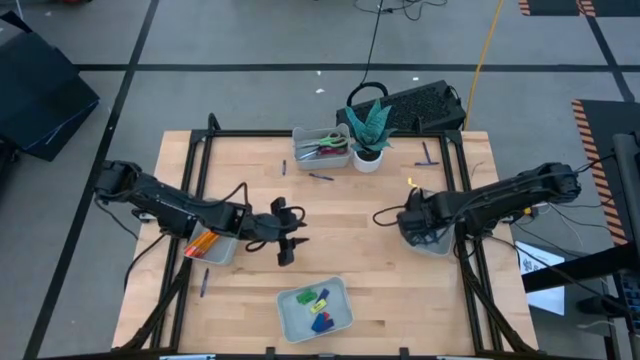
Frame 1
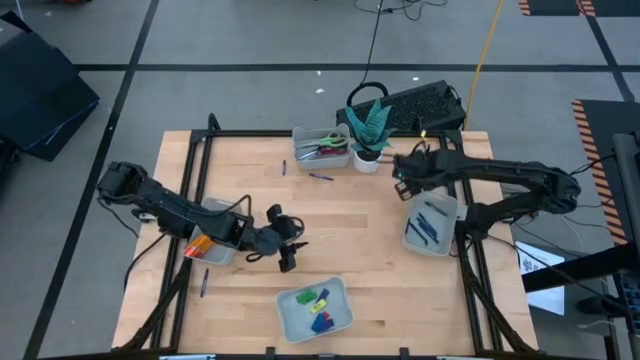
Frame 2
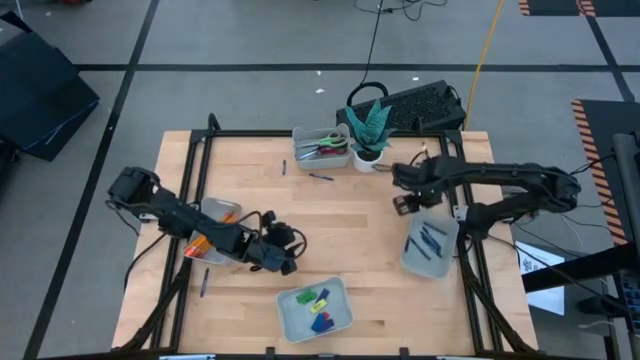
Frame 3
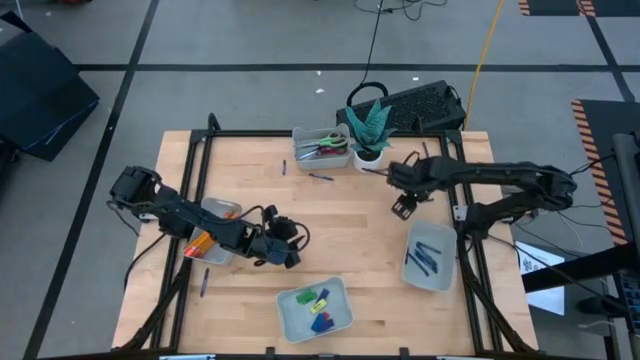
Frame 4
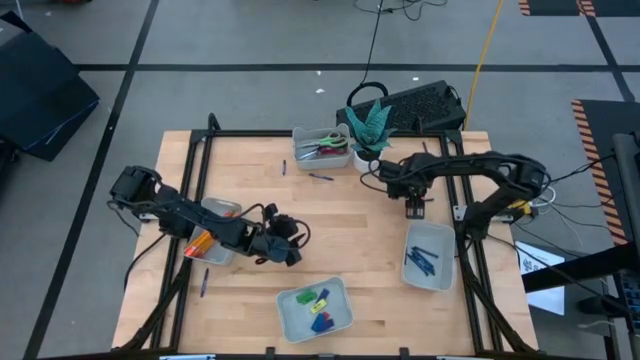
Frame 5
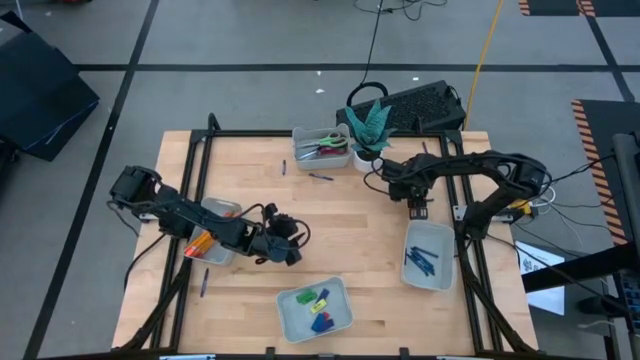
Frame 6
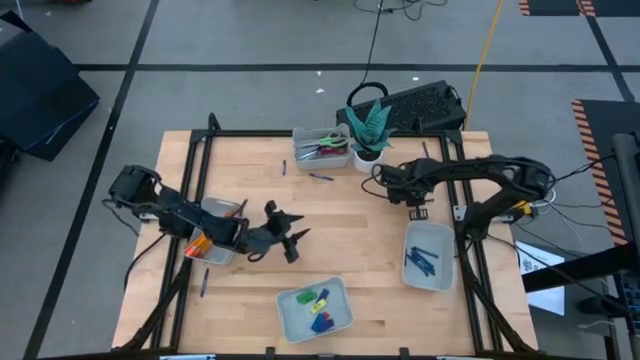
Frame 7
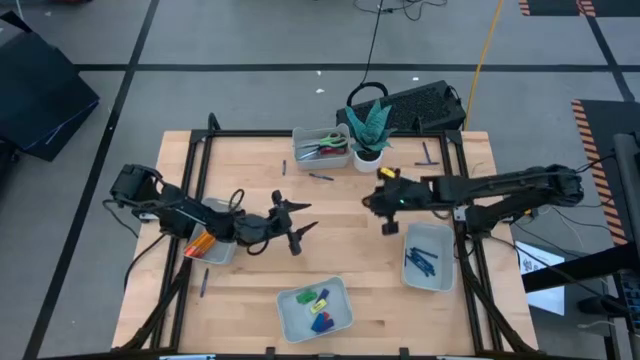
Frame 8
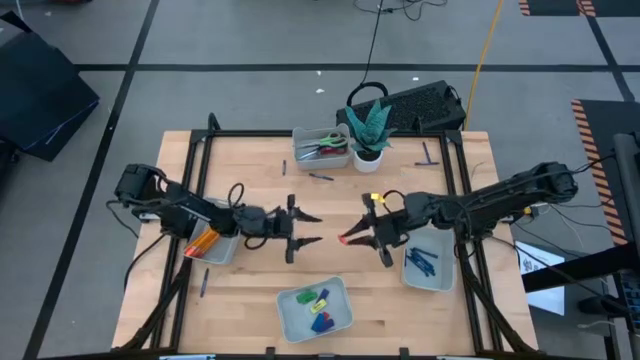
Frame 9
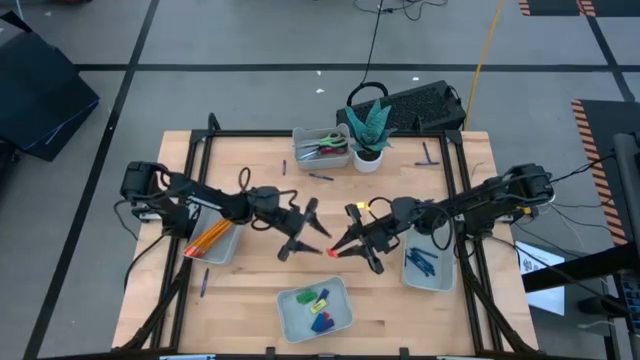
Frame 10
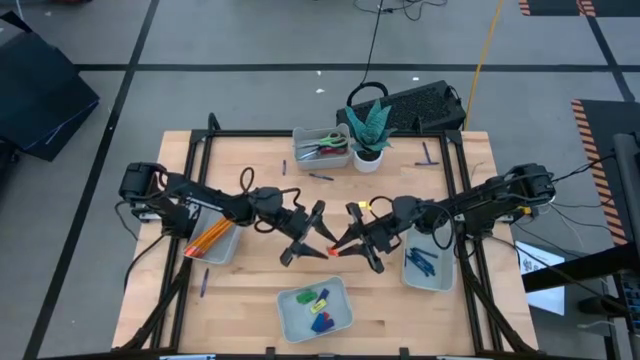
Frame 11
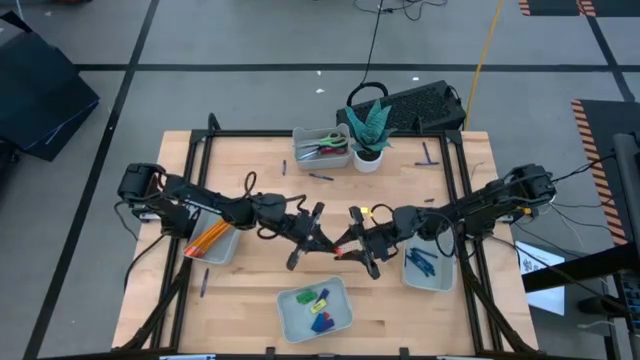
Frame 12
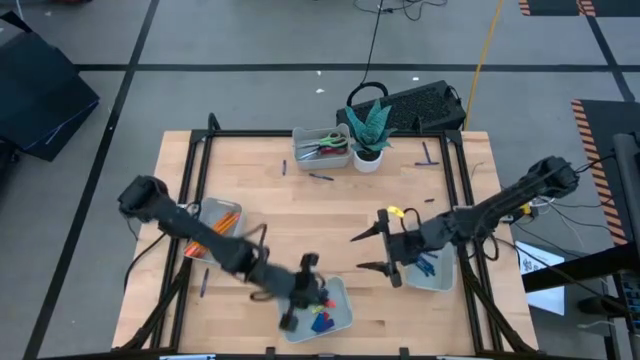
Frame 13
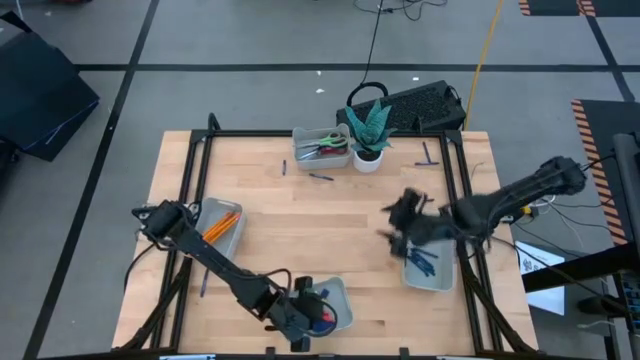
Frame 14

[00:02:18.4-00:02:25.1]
Task: Sort crayons/erasers/pens/pencils in bins
Put the orange eraser into the bottom gray bin

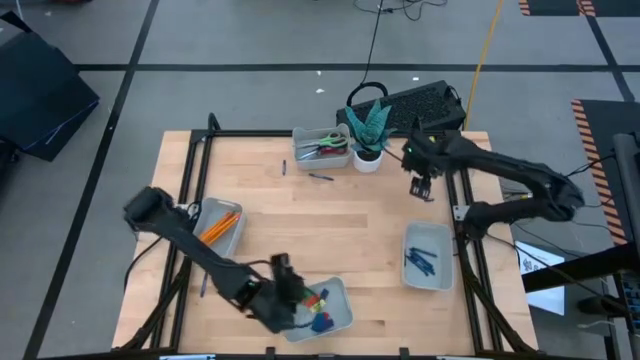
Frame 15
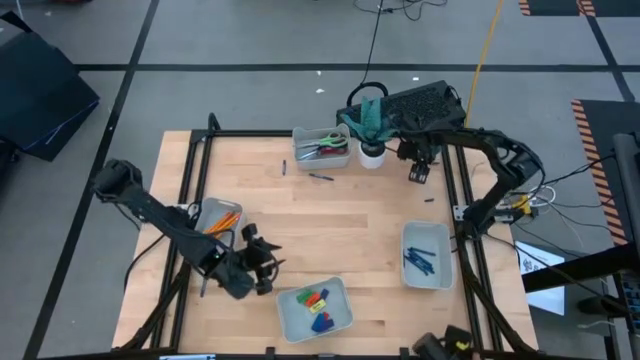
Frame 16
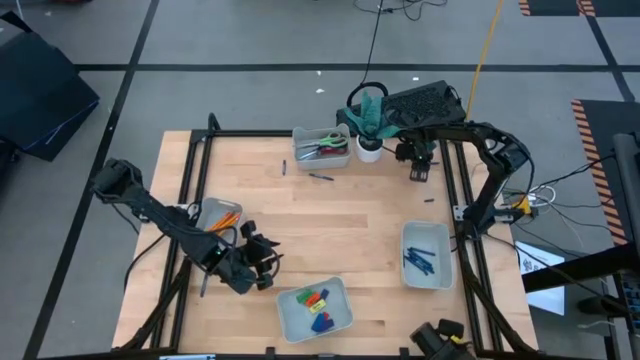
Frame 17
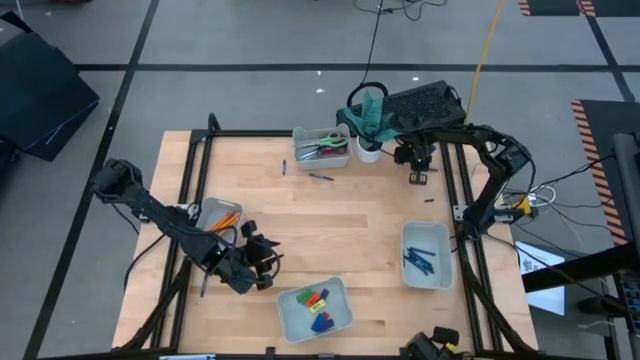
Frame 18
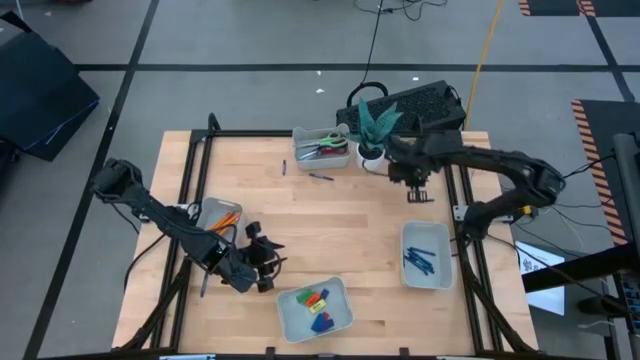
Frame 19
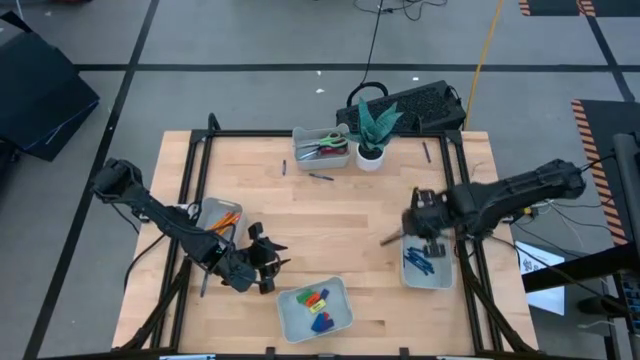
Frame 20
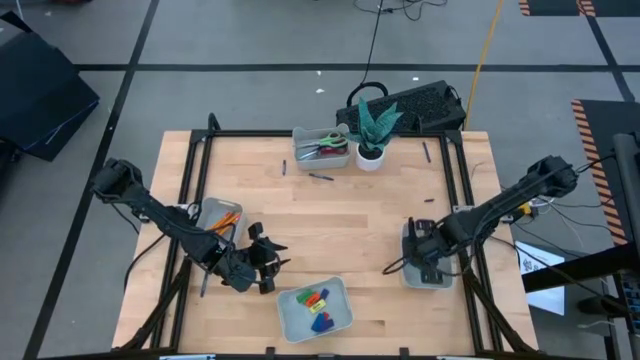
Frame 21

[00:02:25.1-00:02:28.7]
Put the blue crayon into the middle right gray bin

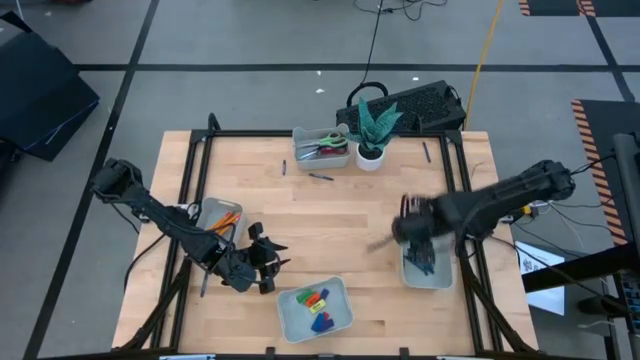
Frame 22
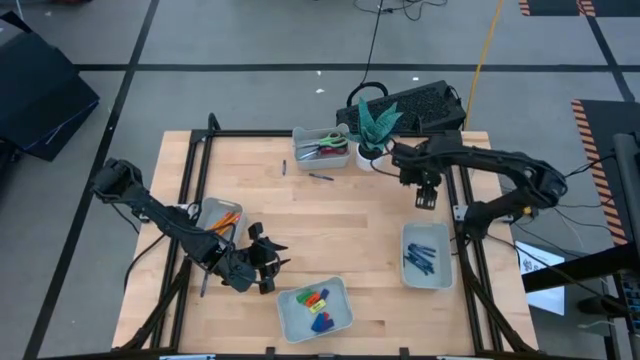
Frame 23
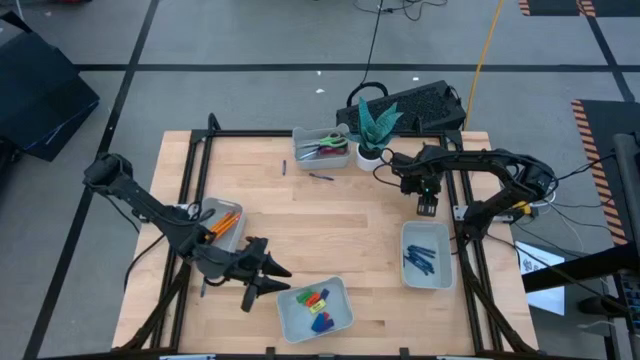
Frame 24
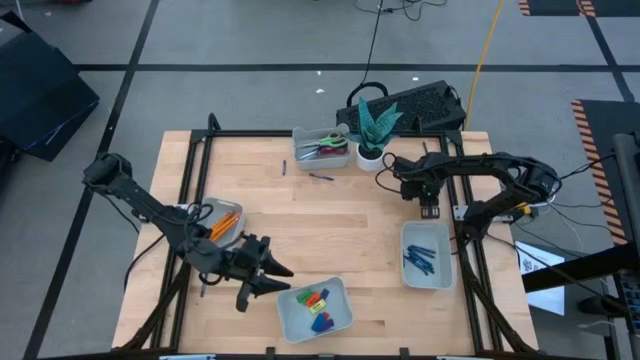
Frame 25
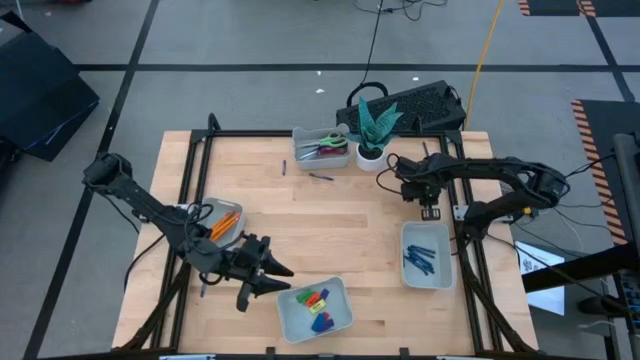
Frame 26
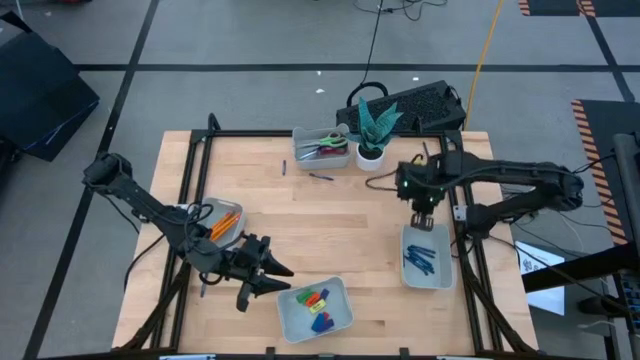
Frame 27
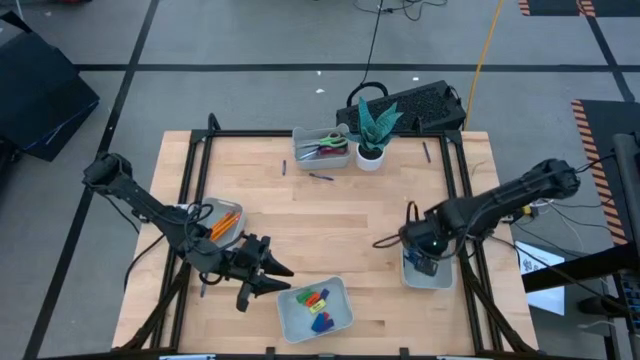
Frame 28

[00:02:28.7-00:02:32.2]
Put the blue crayon into the middle right gray bin

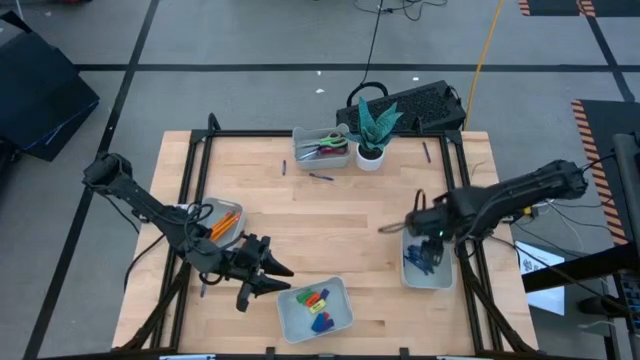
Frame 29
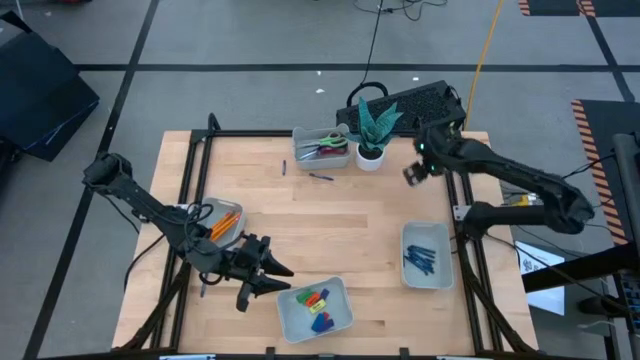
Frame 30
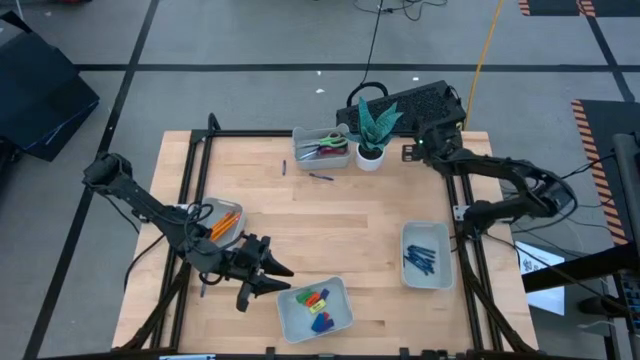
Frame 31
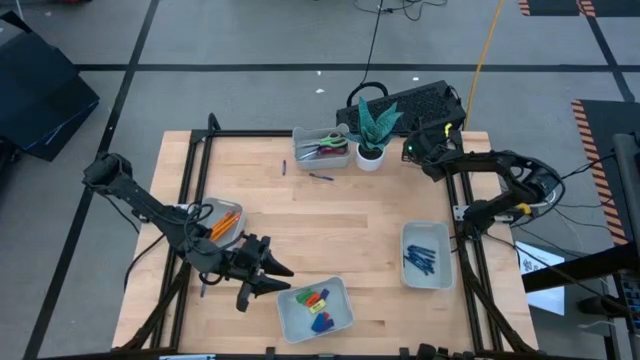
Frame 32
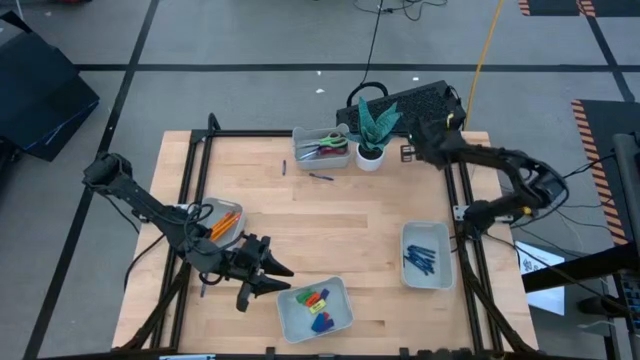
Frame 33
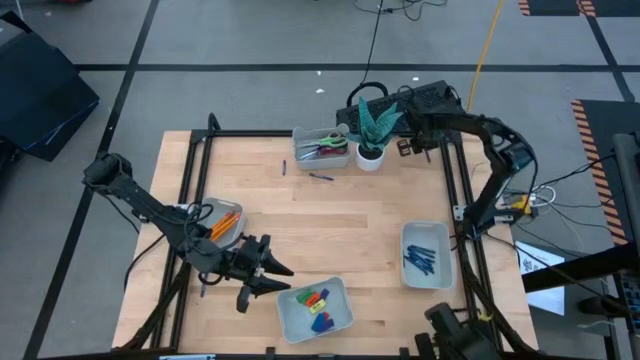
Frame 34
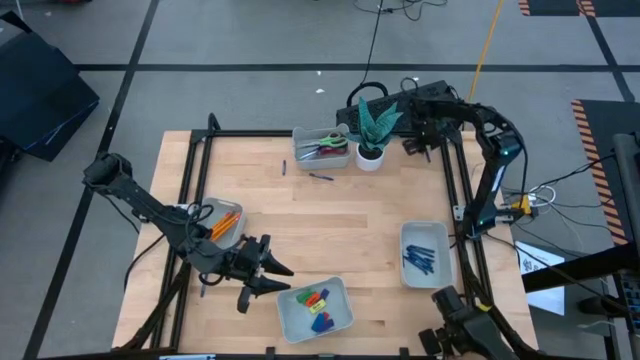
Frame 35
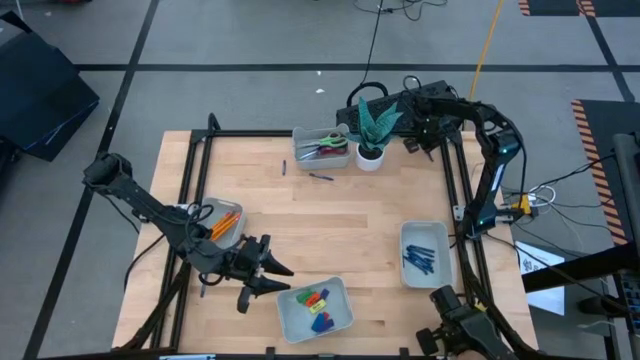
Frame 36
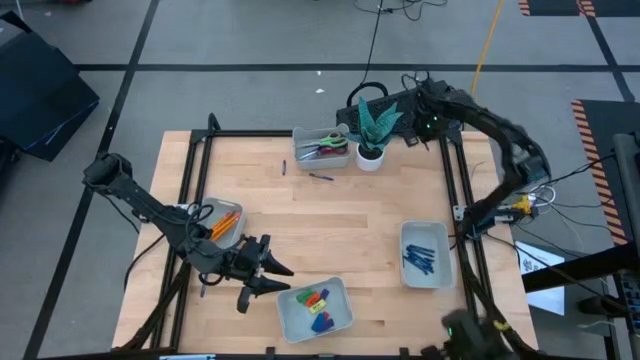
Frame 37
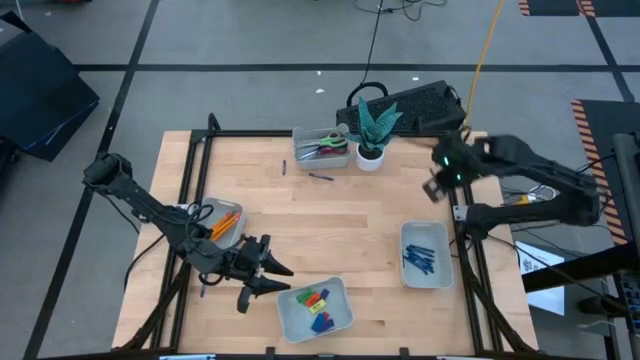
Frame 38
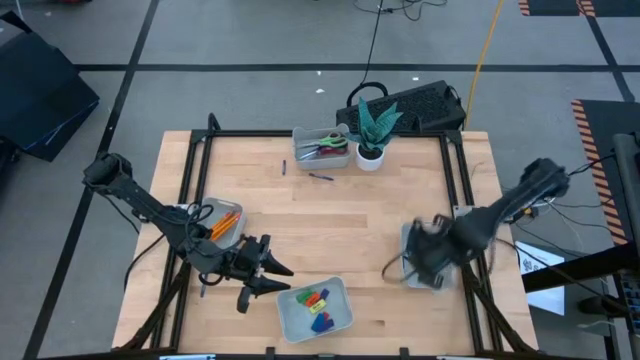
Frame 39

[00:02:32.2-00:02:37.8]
Put the blue crayon into the middle right gray bin

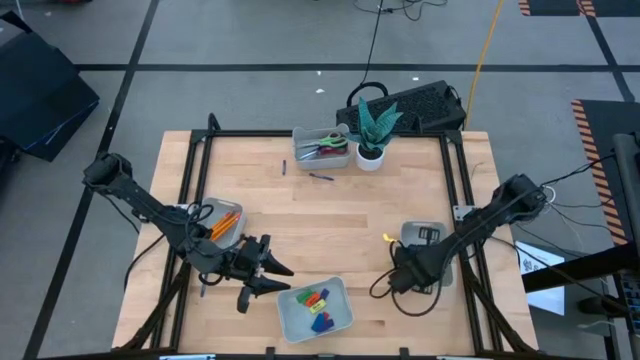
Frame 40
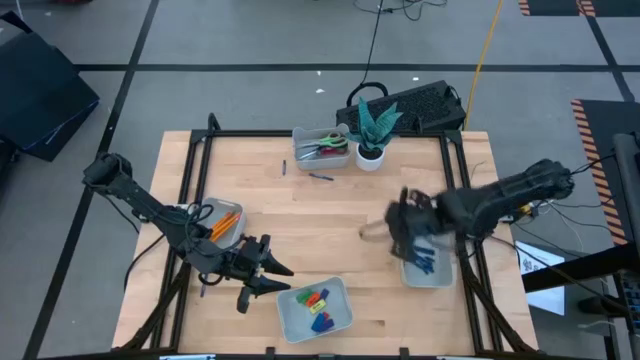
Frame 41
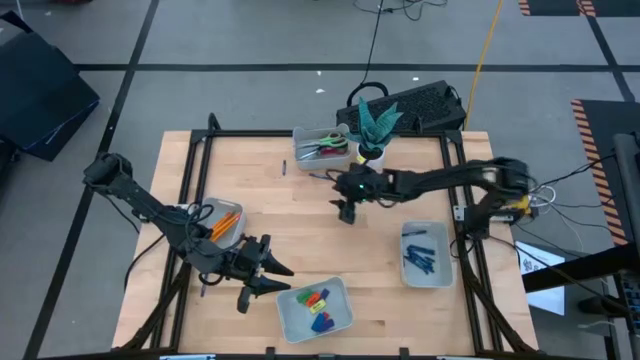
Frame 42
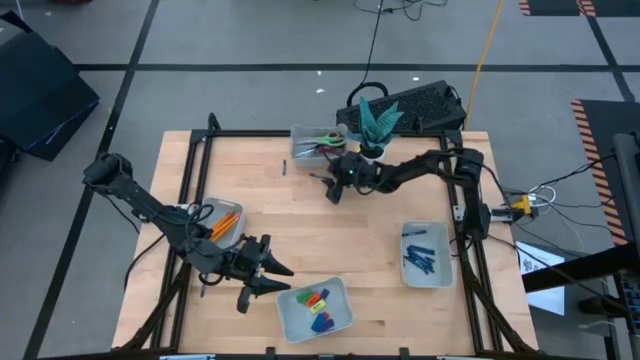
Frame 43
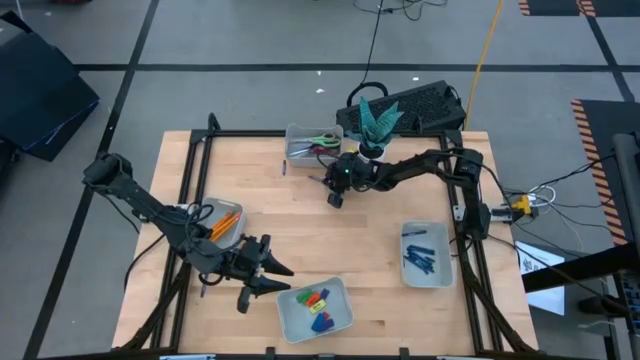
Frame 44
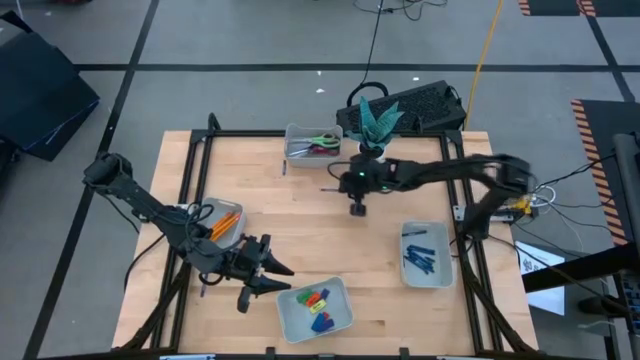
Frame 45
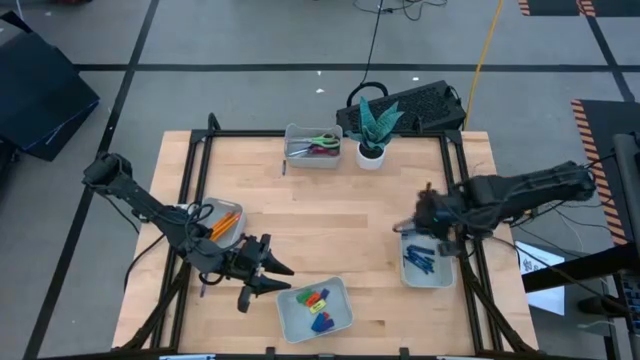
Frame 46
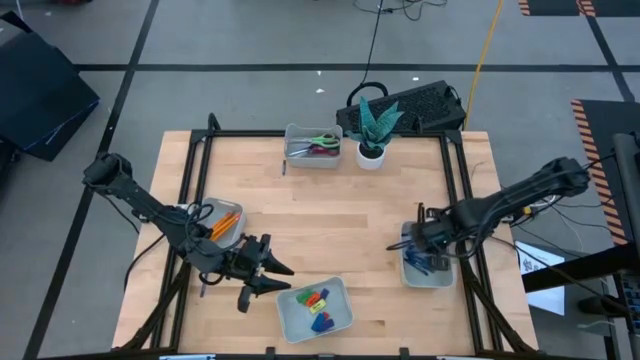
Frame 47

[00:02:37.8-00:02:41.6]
Put the blue crayon into the middle right gray bin
